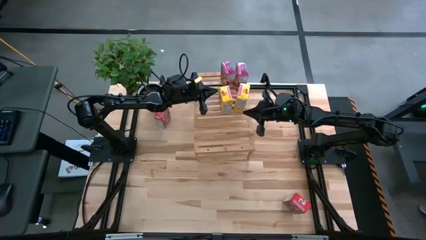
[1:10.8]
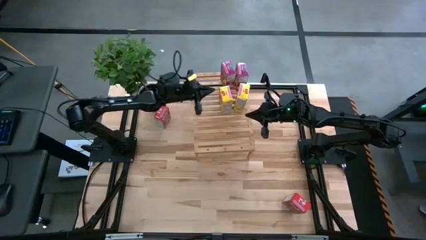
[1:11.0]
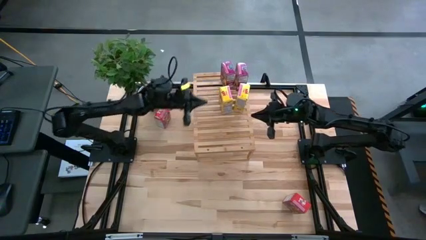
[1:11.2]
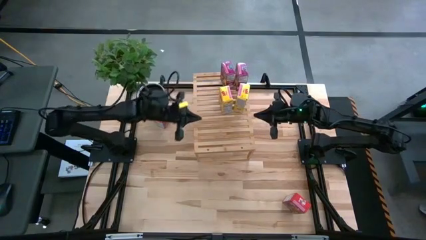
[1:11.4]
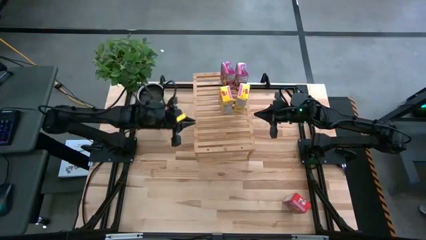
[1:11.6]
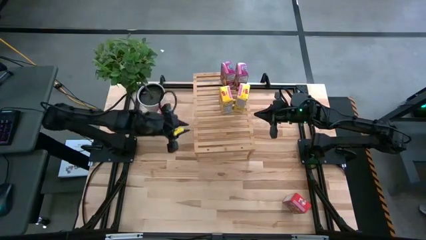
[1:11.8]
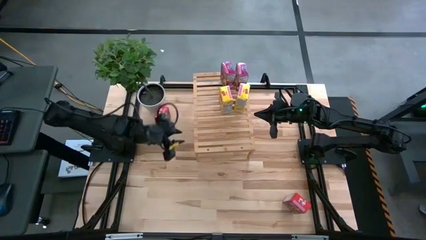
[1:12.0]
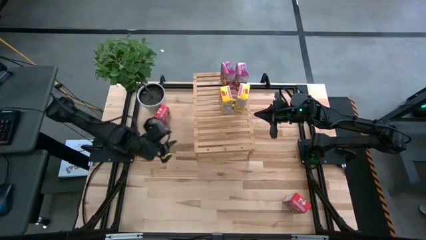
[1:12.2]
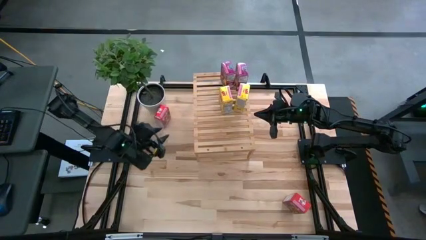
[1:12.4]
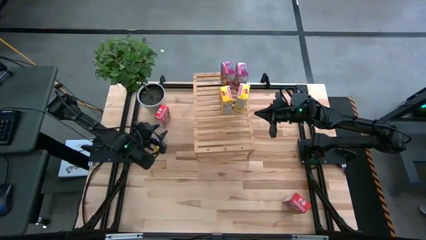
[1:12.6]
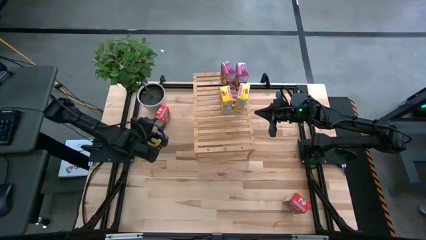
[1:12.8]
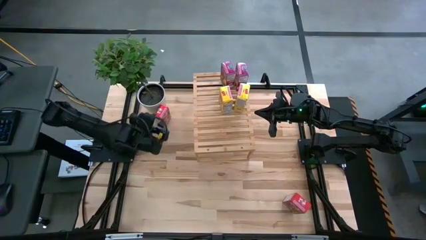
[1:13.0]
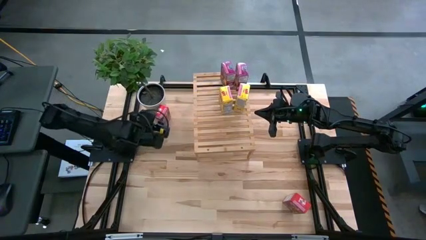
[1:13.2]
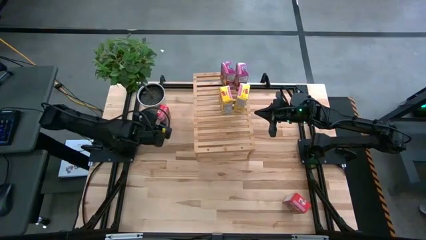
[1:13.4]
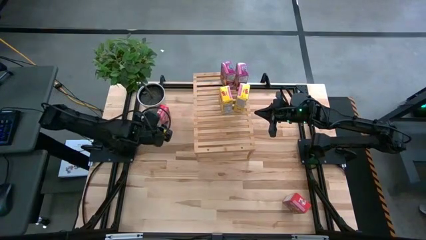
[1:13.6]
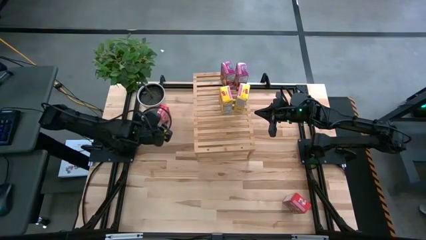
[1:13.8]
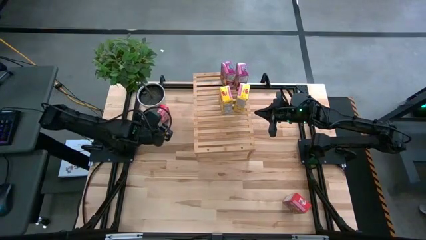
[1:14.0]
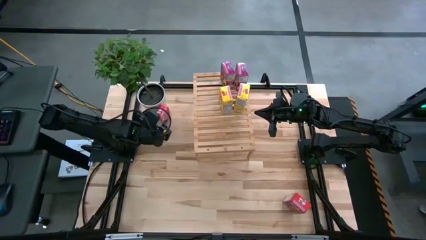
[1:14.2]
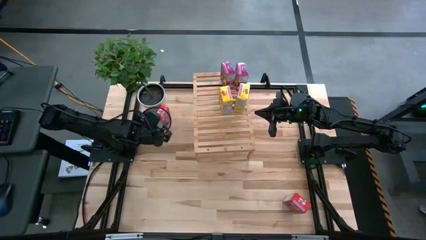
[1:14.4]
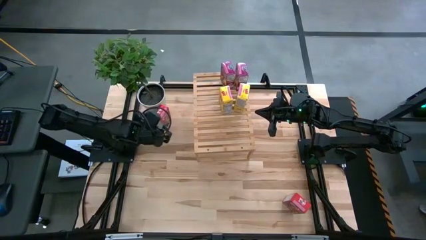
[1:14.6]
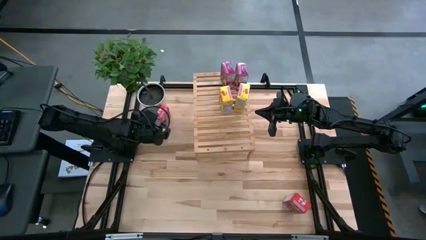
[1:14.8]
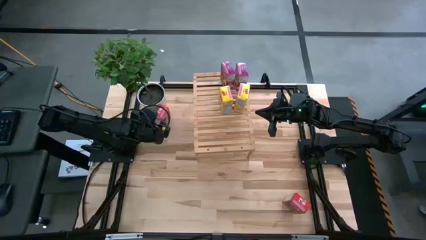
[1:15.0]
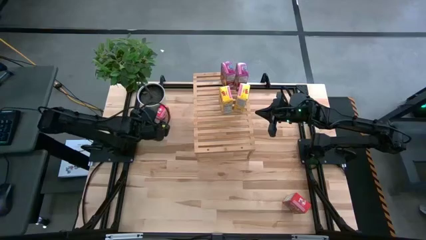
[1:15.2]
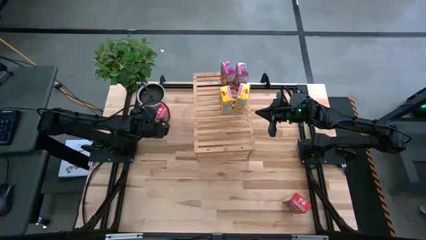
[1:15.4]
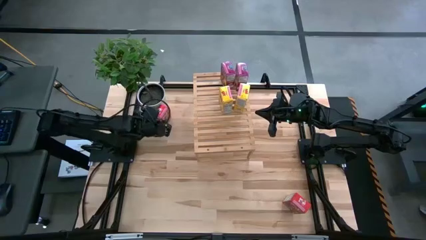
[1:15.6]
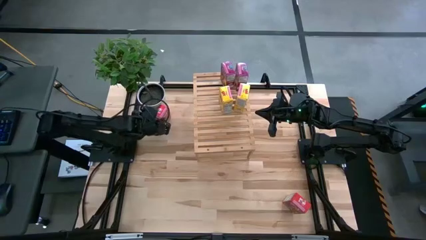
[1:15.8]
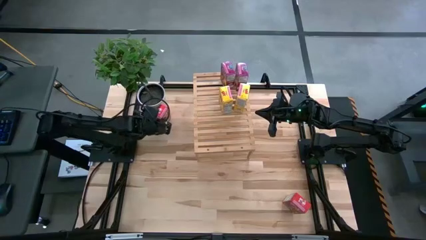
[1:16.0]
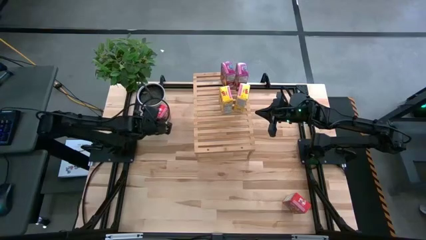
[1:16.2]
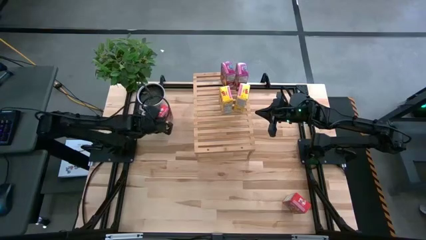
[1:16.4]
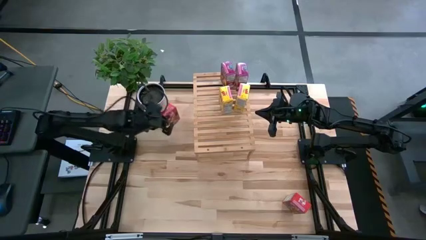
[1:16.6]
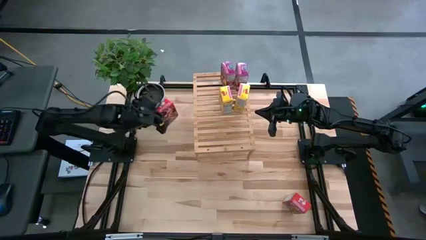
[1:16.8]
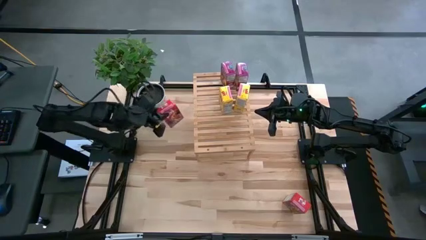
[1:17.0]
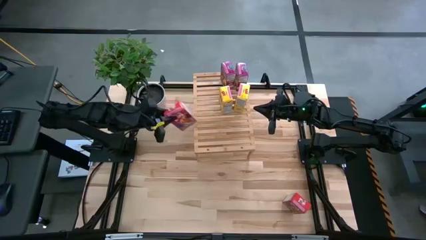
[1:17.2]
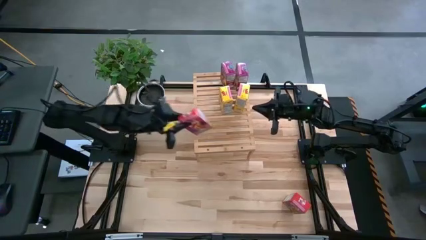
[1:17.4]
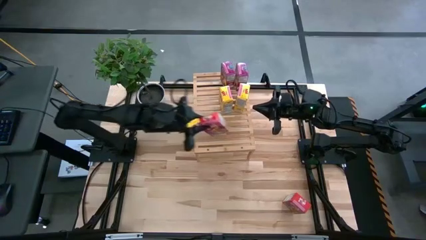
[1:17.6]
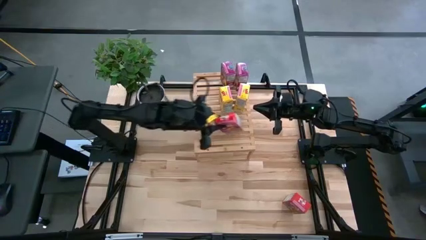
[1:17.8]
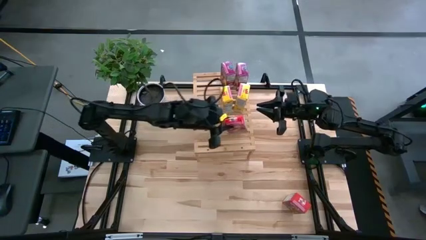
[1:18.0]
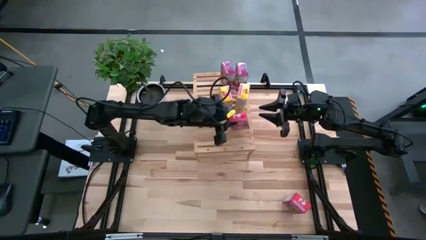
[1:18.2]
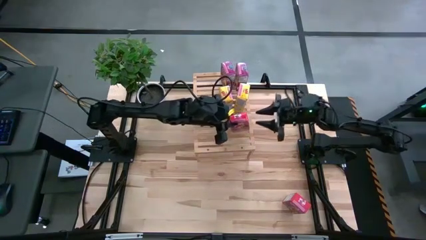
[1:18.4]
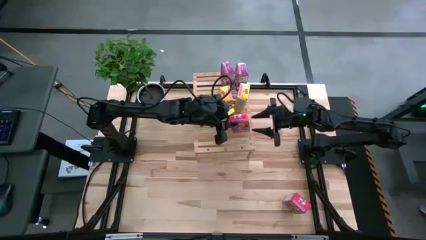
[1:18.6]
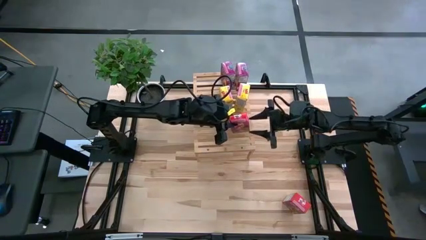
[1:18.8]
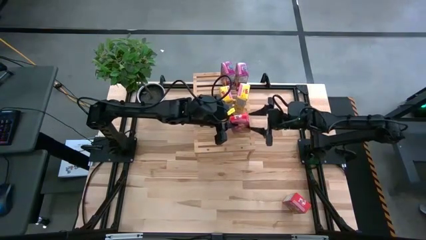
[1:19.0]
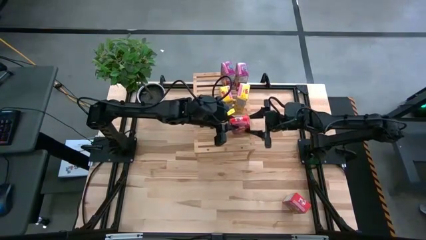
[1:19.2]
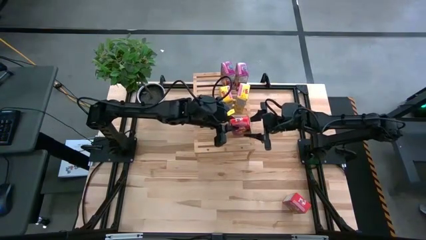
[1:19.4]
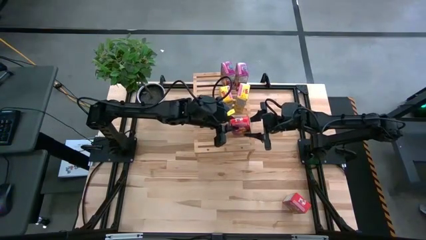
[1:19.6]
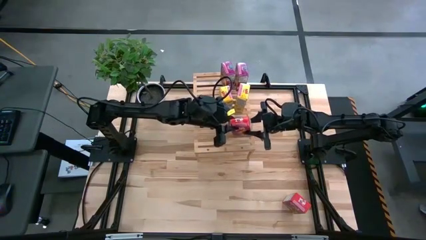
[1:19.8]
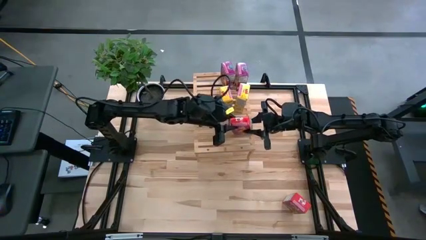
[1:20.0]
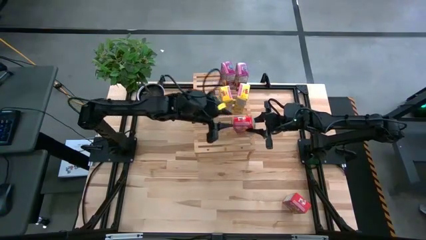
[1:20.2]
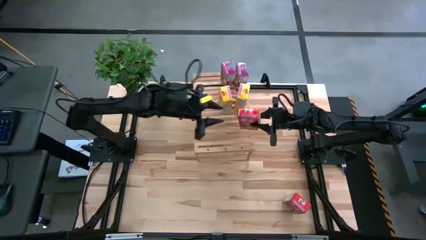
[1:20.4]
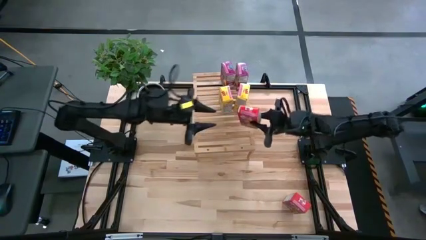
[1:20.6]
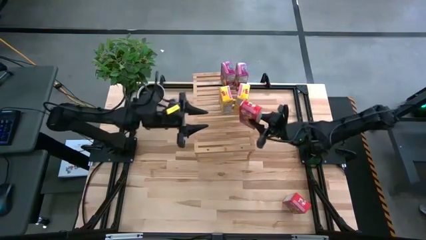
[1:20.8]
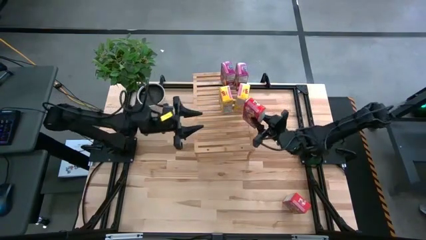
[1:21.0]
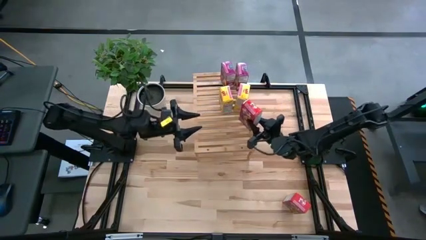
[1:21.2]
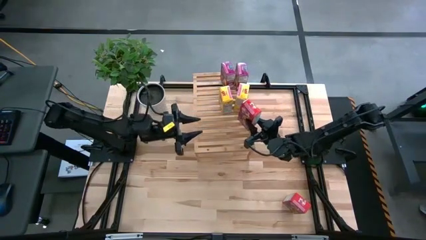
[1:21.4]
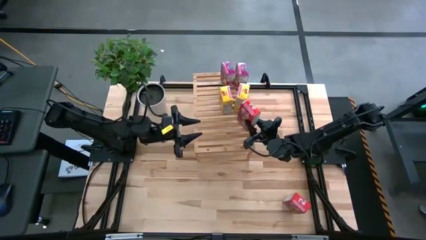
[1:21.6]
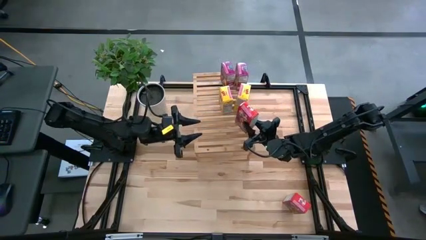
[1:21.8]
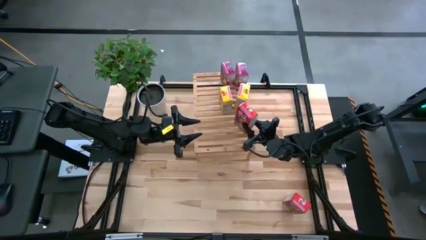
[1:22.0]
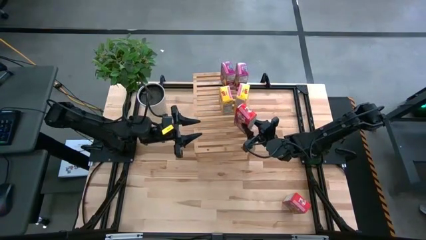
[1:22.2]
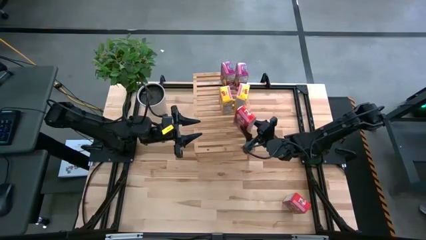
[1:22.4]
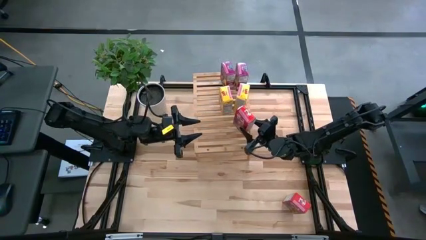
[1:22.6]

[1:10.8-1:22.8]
Task: Stack cereal on shelf
Put the top red cereal box on the shelf
